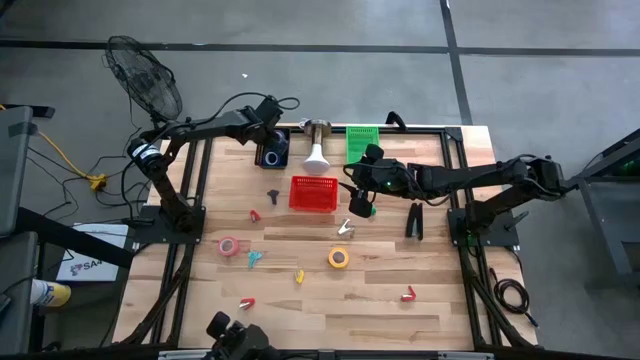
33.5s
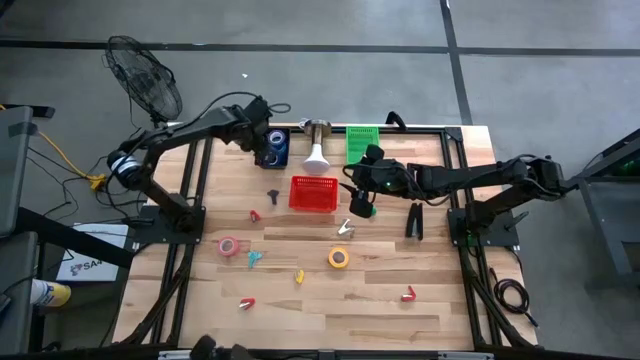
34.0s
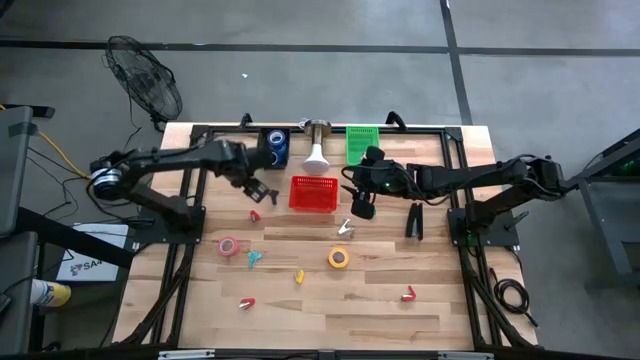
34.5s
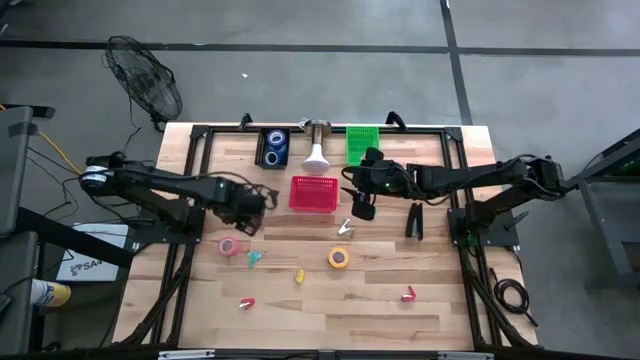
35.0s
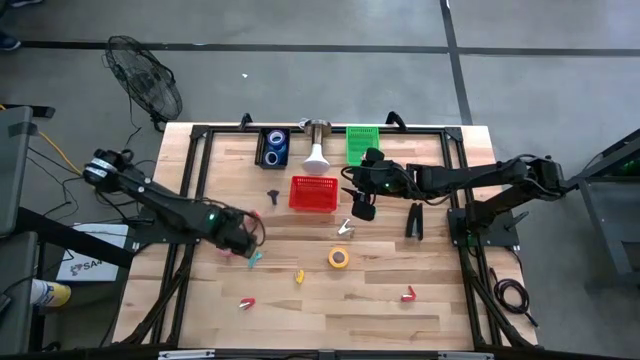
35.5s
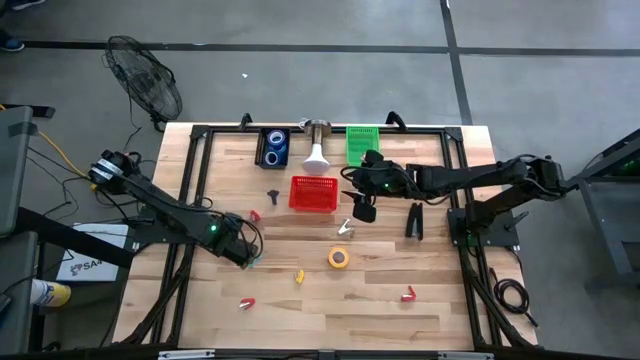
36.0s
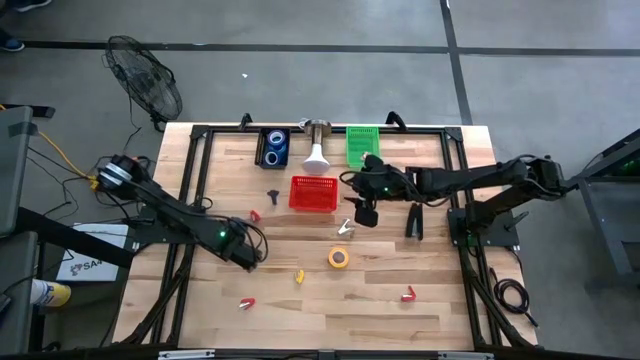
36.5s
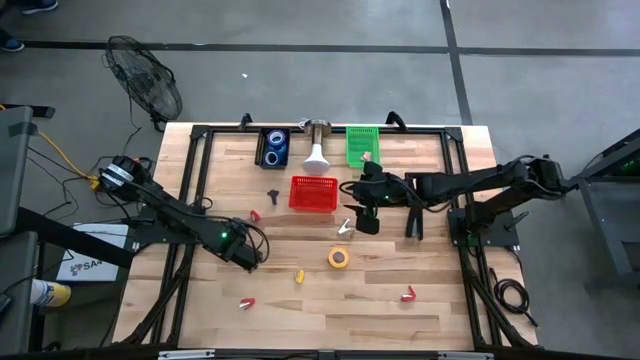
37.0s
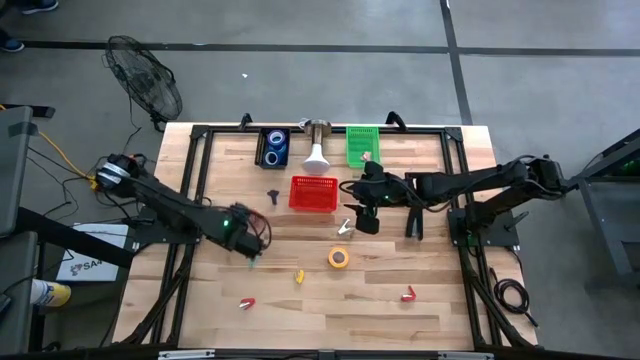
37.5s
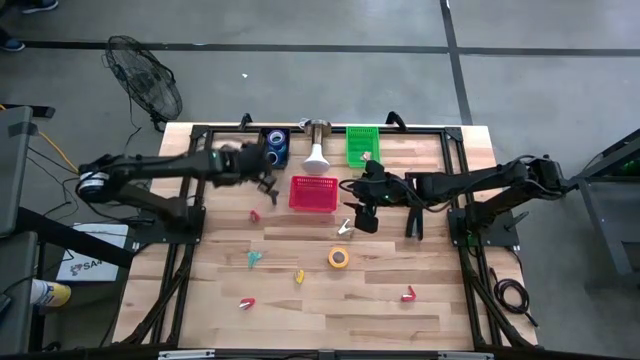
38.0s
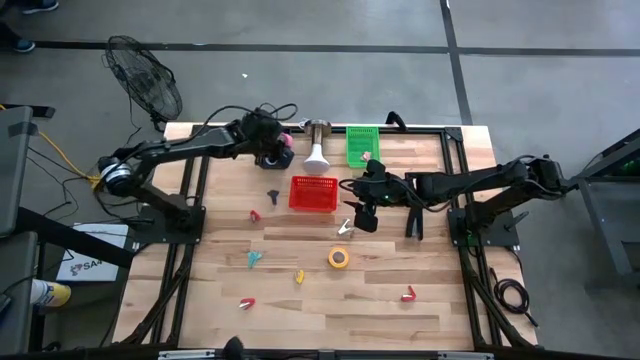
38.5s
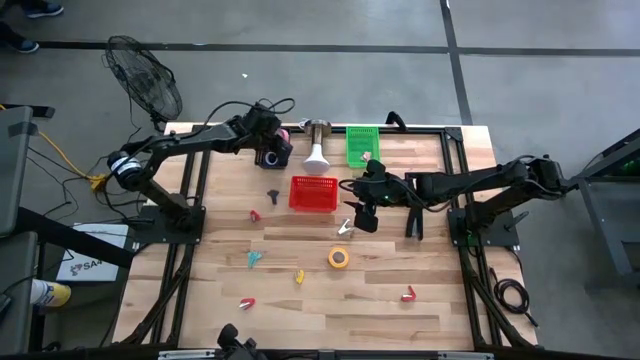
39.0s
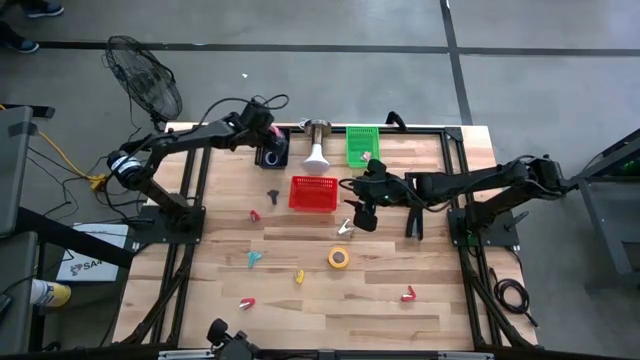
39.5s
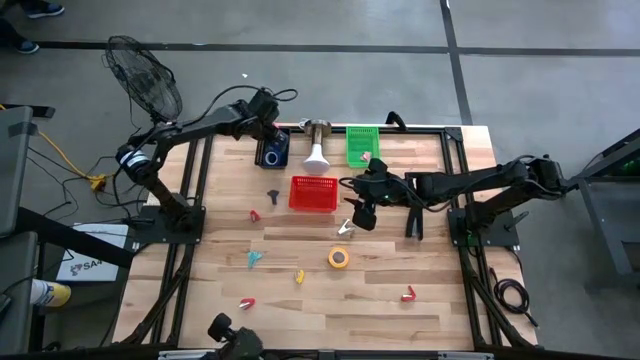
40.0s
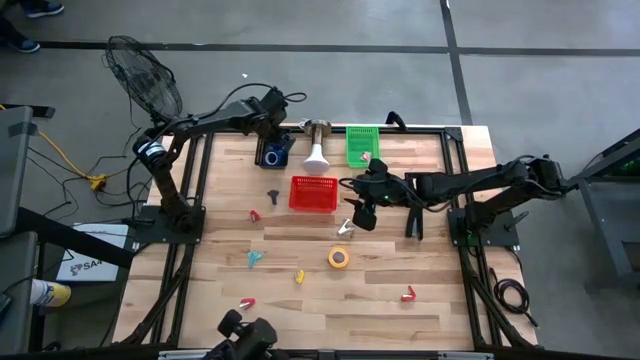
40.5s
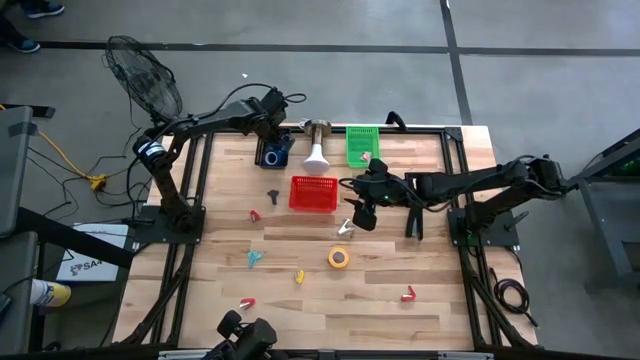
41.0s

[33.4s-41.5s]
Task: Pick and place Stapler, Stapler remover, tape
Put the pink tape into the black basket

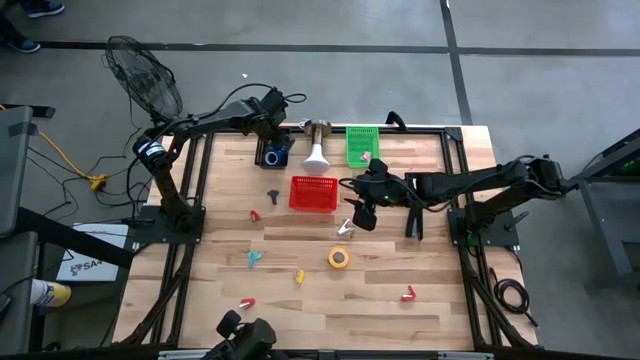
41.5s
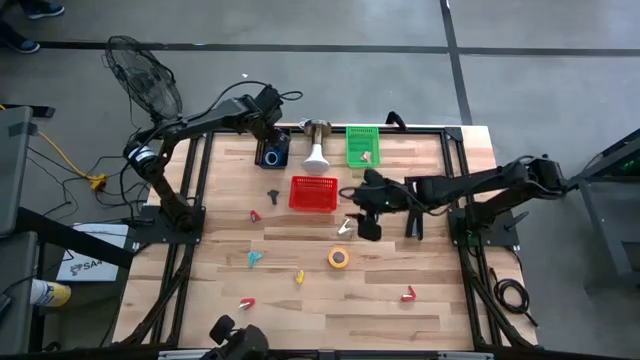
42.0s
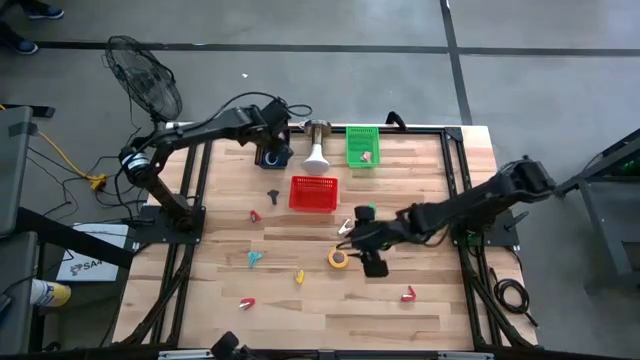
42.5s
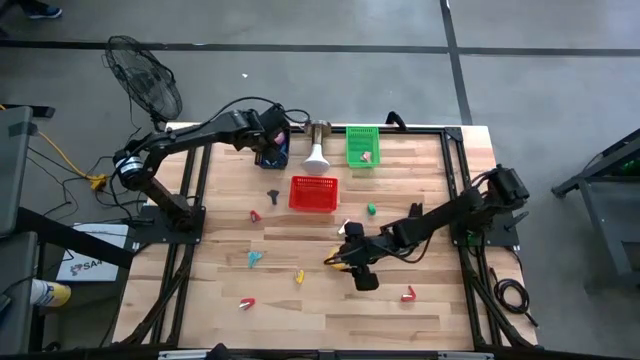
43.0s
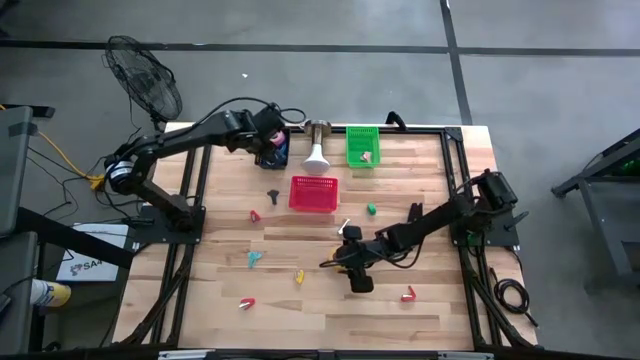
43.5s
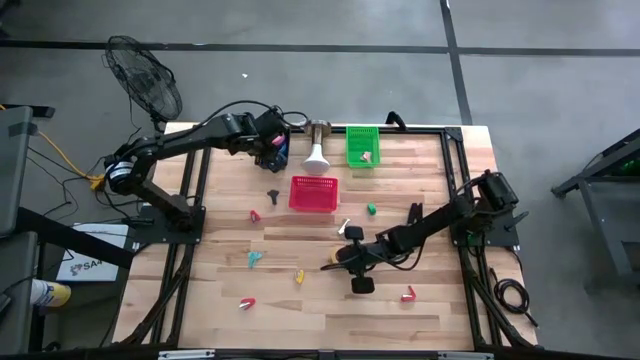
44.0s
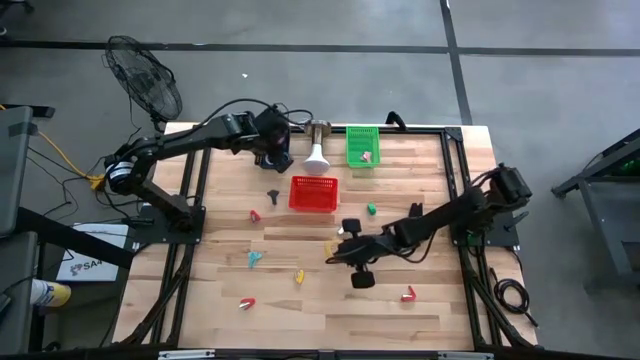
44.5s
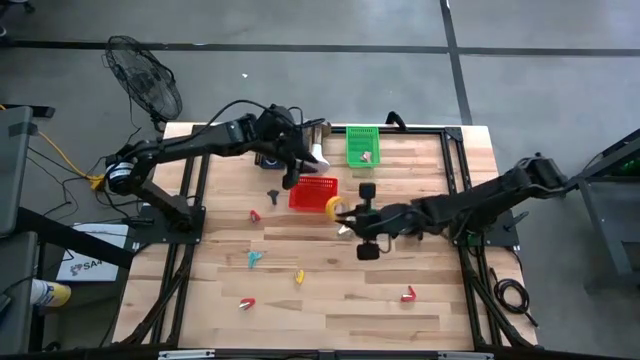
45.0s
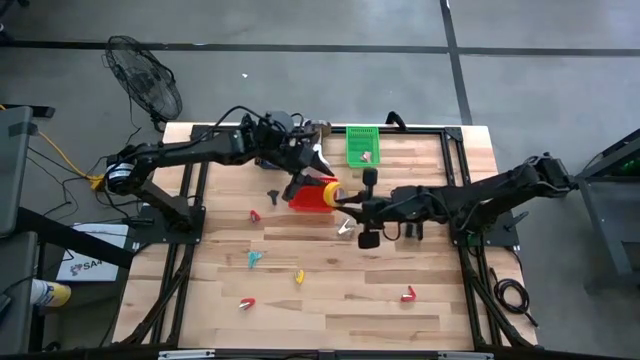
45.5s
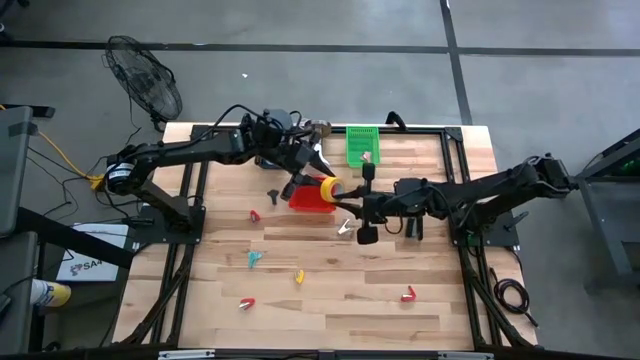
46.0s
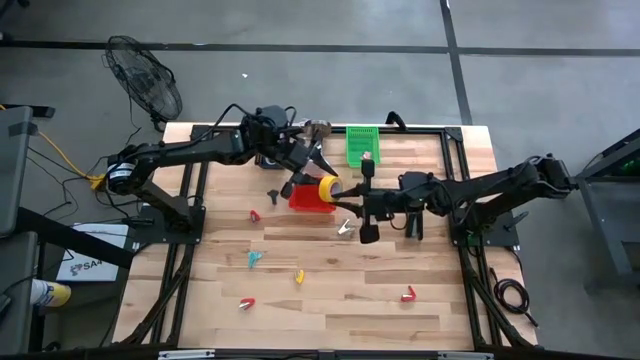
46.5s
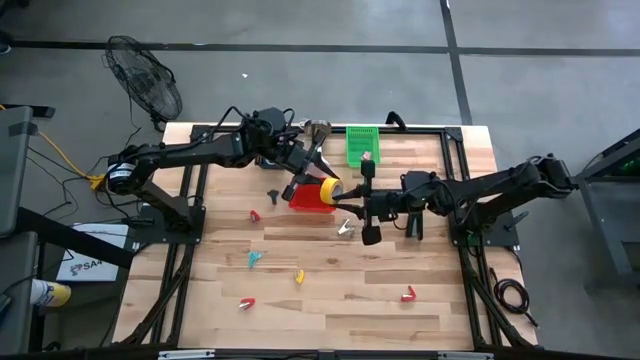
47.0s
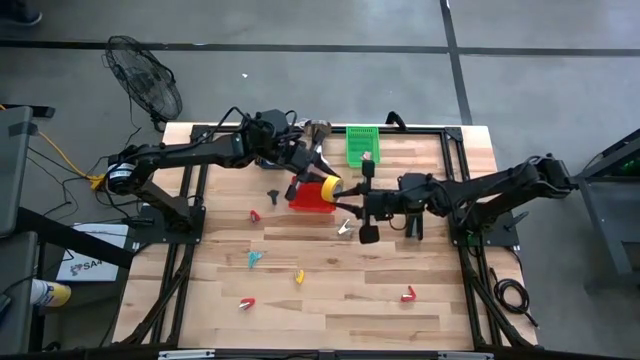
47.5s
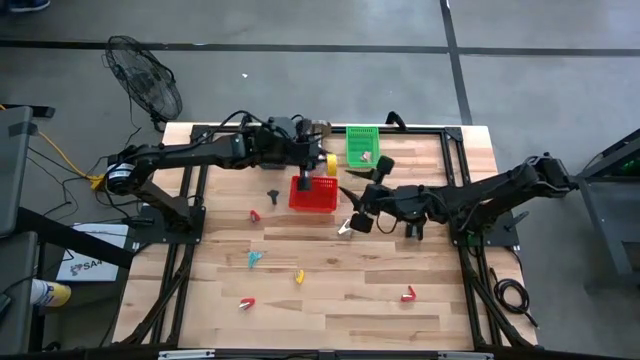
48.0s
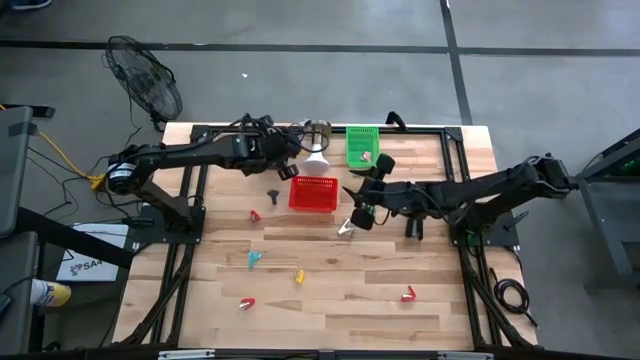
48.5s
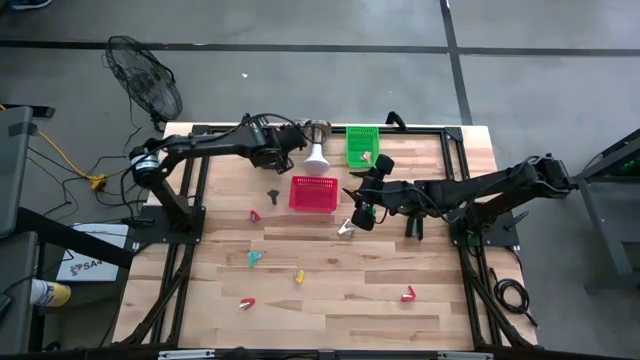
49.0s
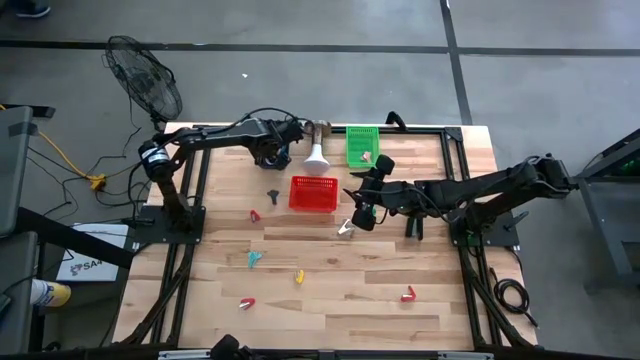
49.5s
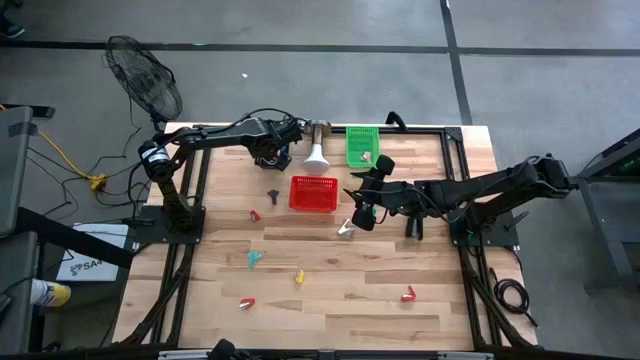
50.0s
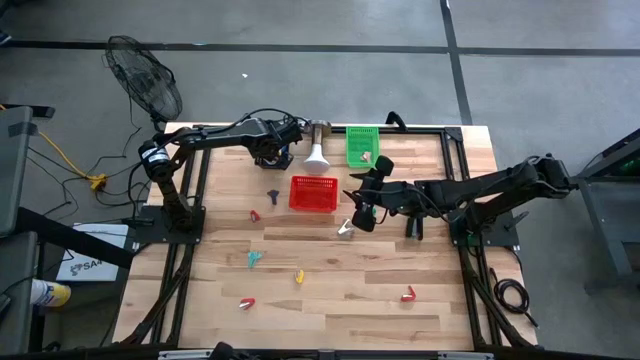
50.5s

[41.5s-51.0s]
Put the yellow tape into the black basket

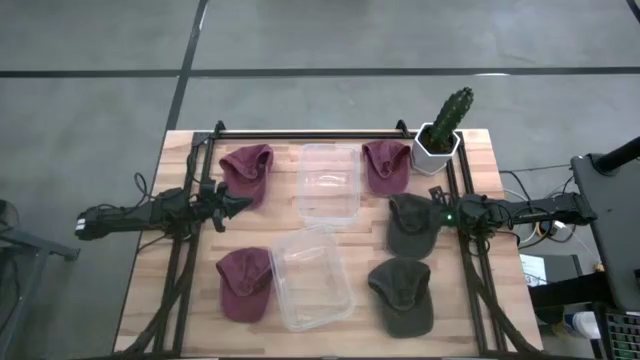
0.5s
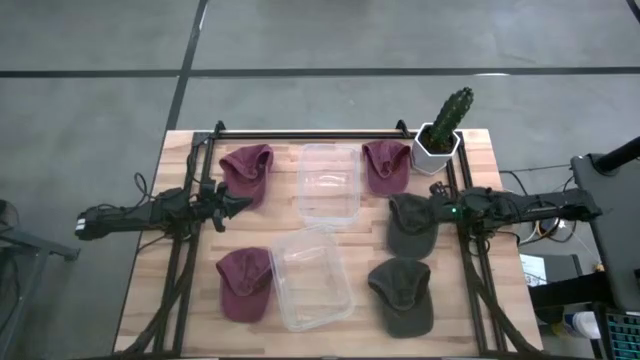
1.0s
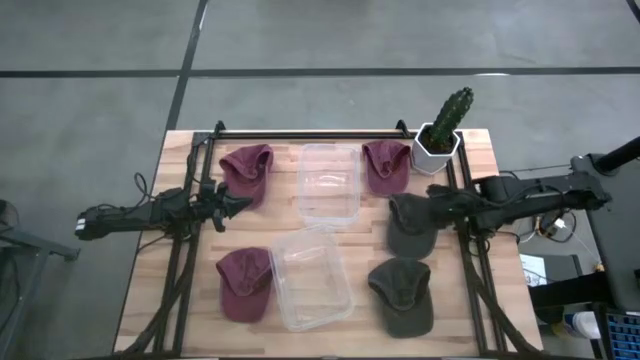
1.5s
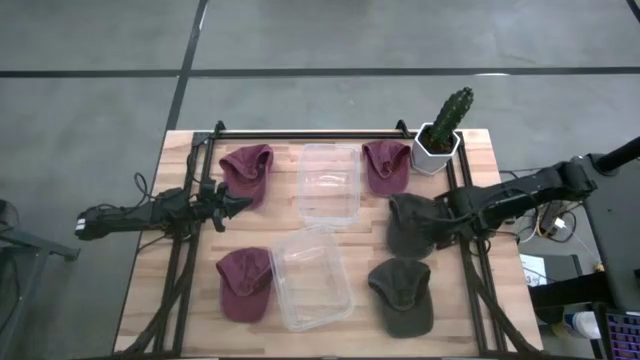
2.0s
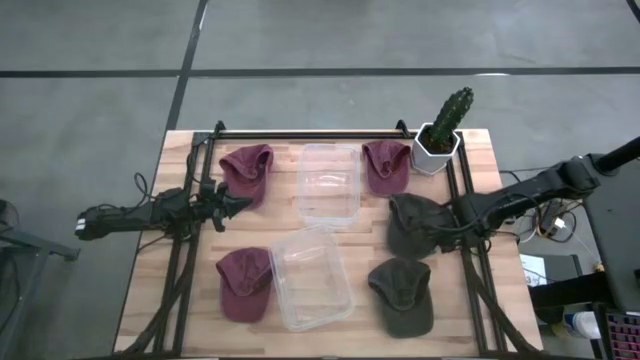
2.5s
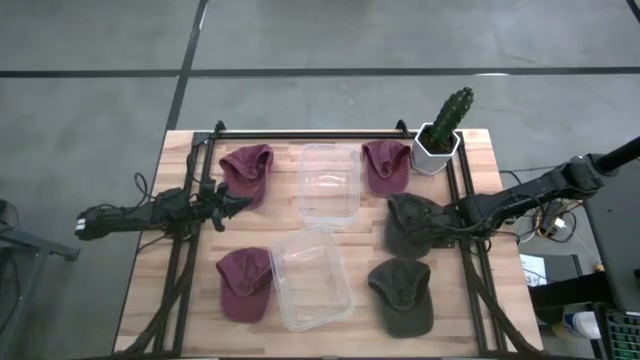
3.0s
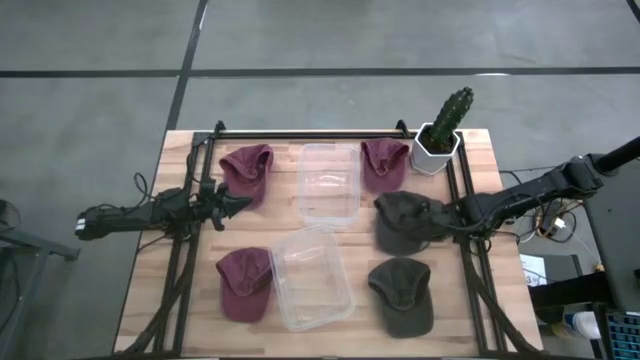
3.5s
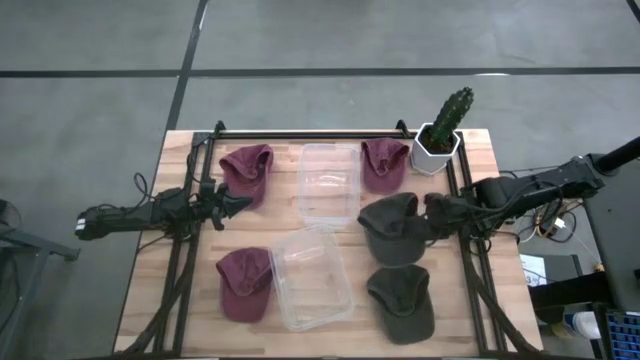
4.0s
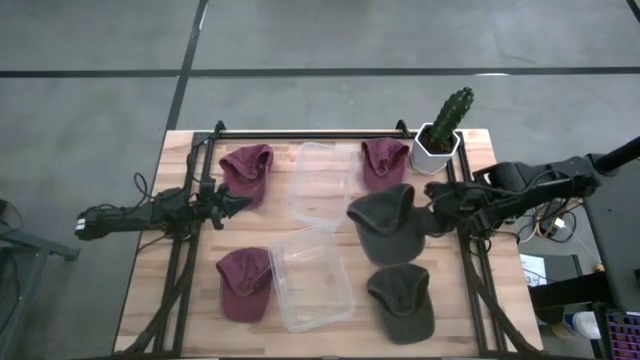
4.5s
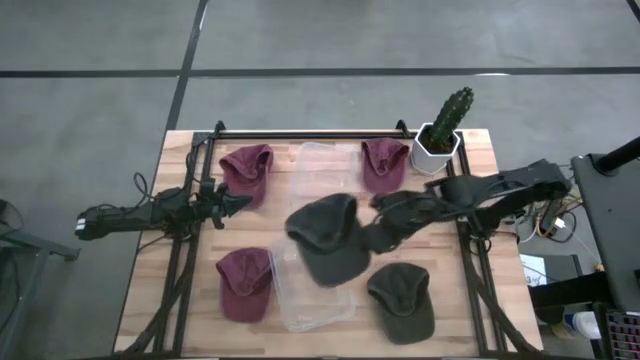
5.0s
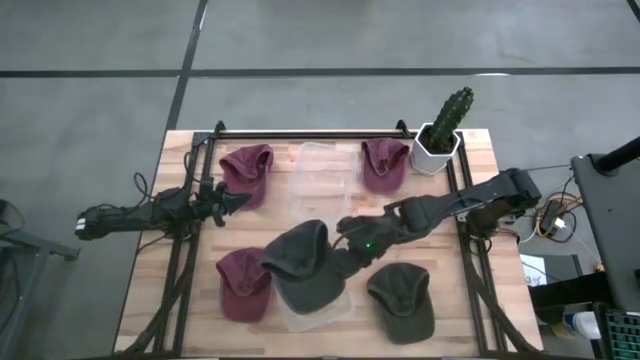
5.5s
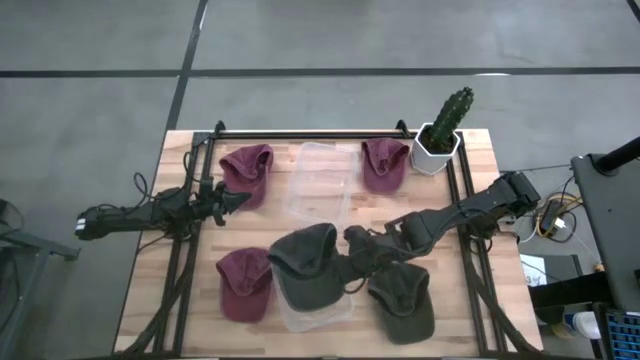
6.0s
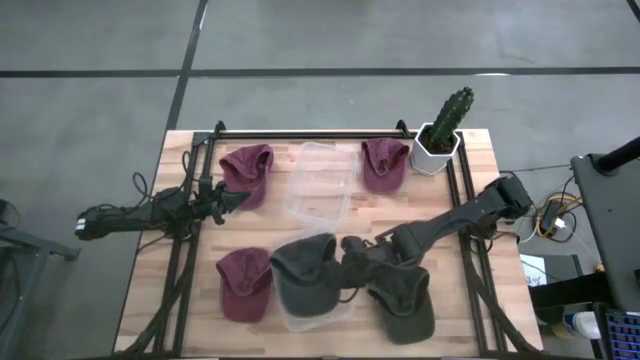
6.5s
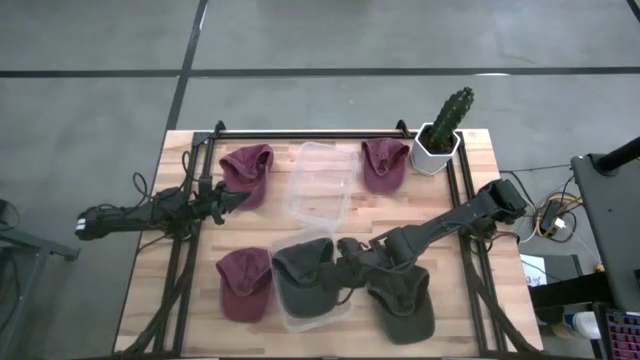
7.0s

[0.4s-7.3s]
Task: Pick & Place hat
Put the top black cap into the bottom transparent bin
